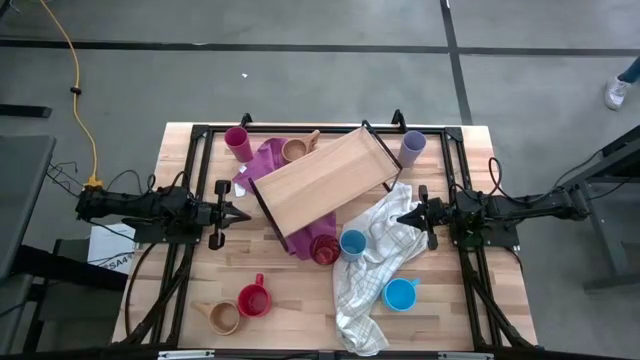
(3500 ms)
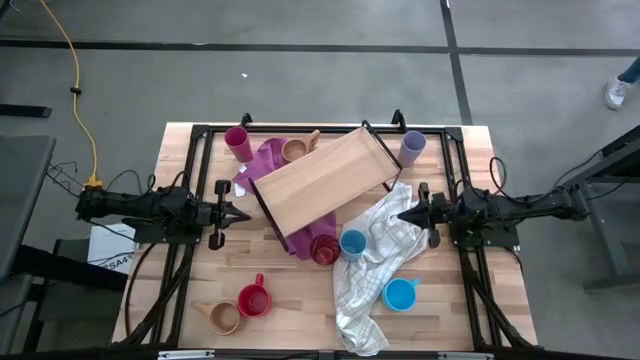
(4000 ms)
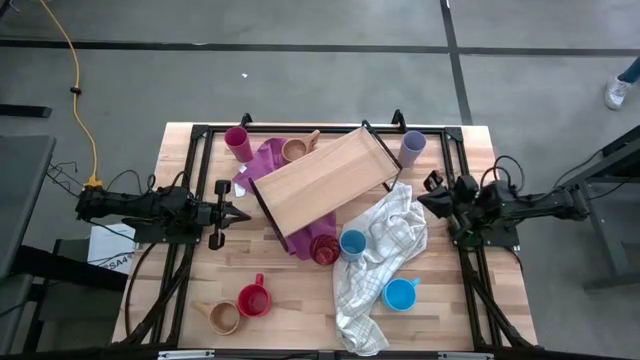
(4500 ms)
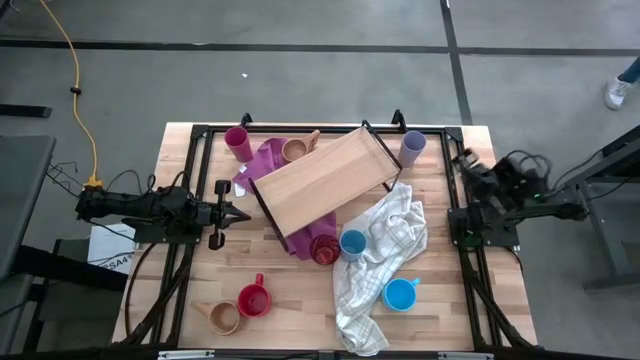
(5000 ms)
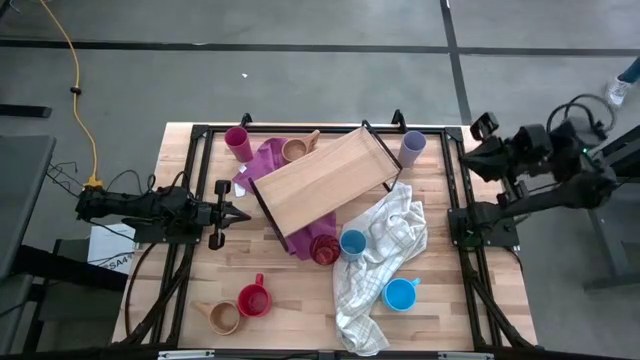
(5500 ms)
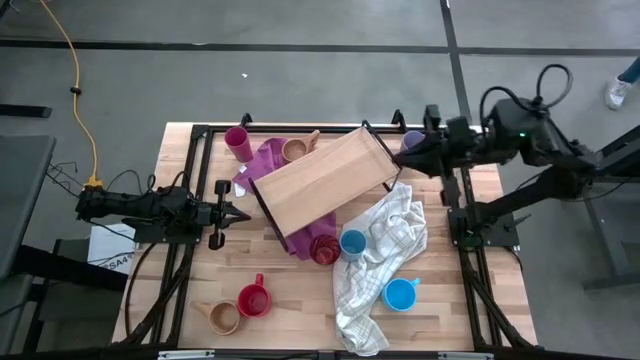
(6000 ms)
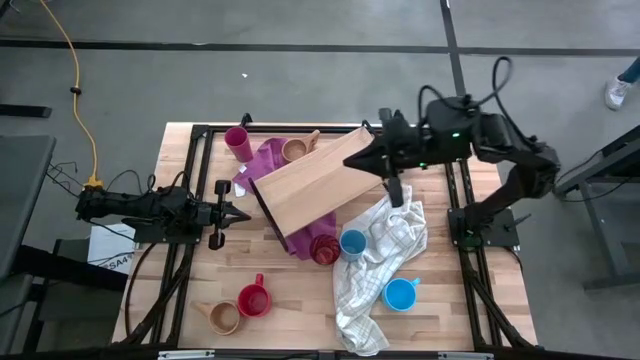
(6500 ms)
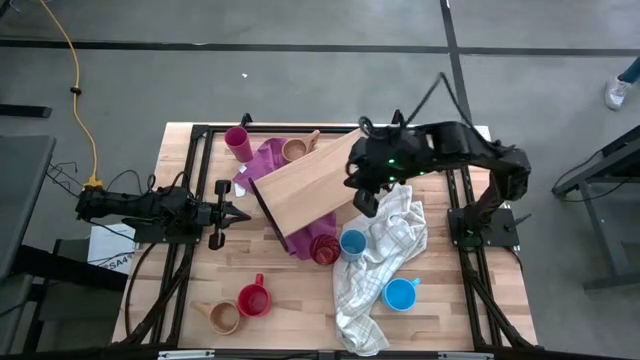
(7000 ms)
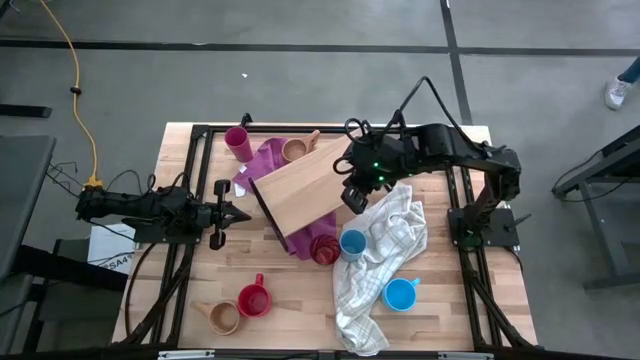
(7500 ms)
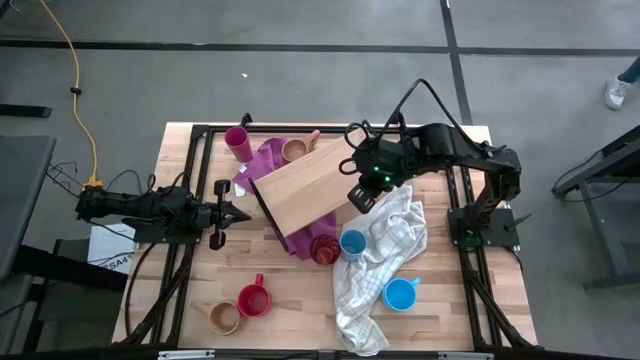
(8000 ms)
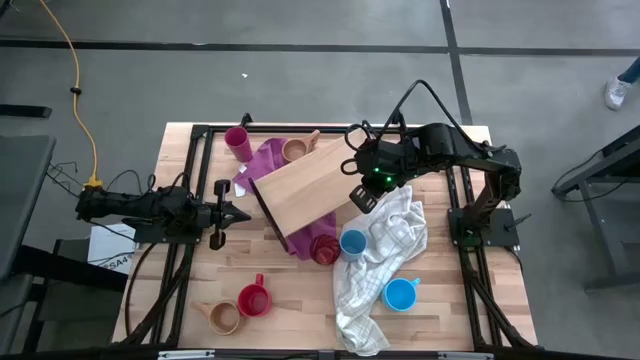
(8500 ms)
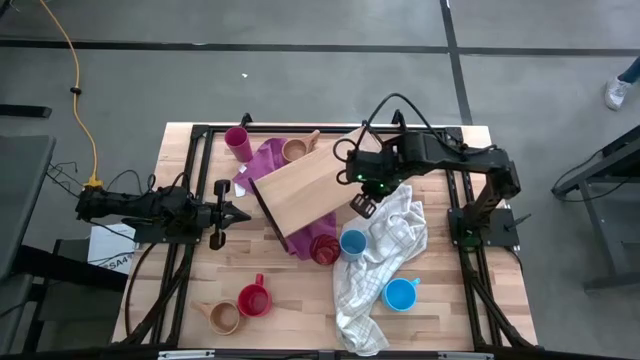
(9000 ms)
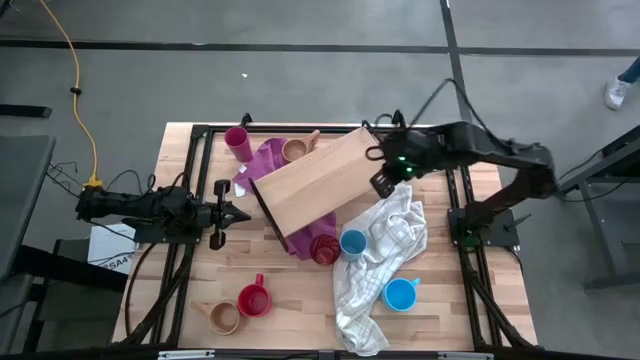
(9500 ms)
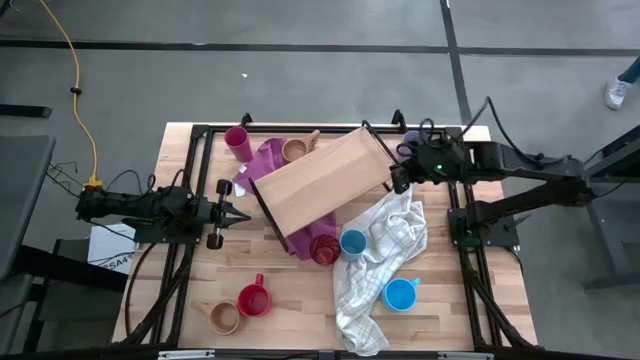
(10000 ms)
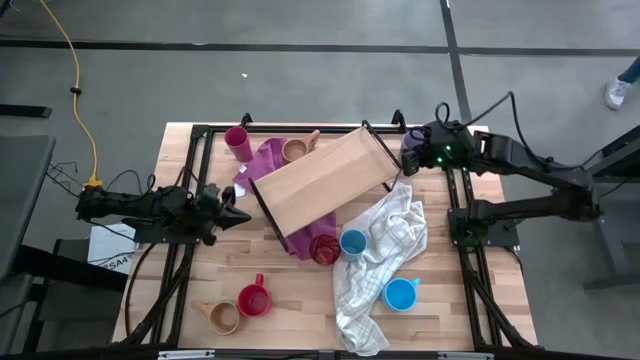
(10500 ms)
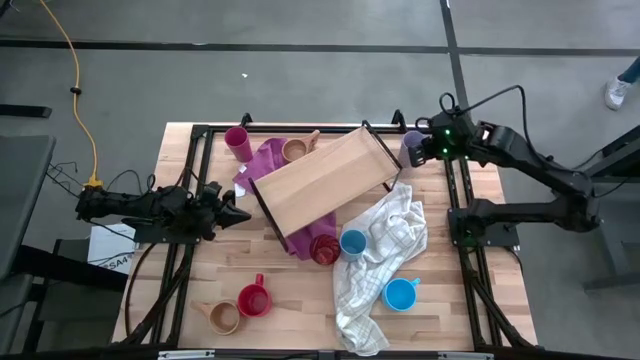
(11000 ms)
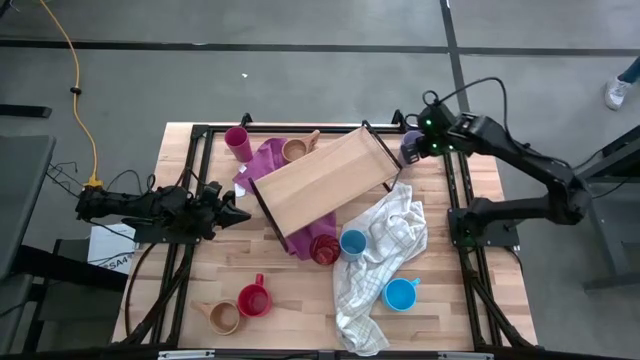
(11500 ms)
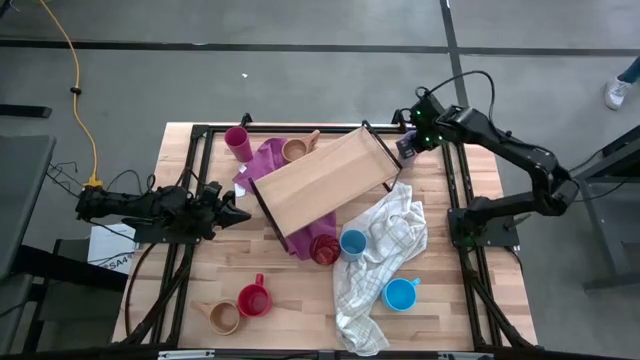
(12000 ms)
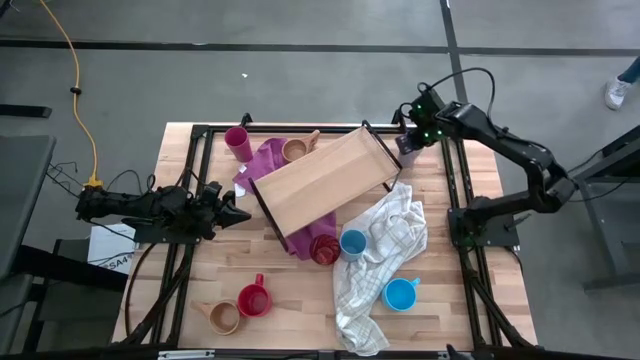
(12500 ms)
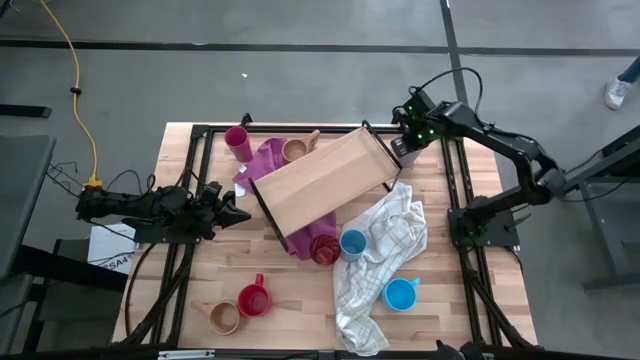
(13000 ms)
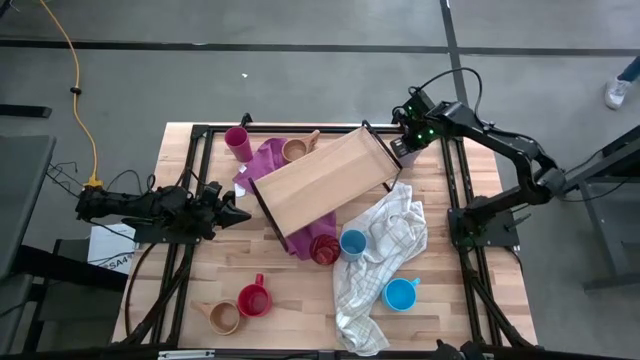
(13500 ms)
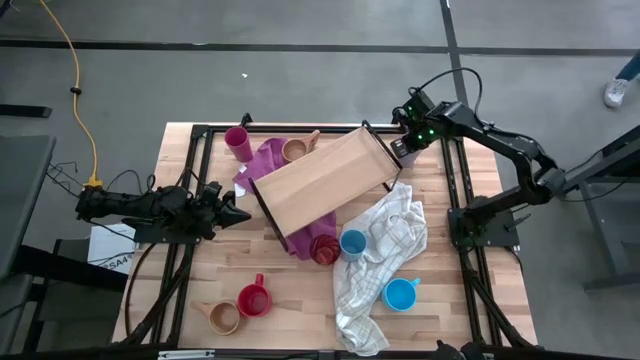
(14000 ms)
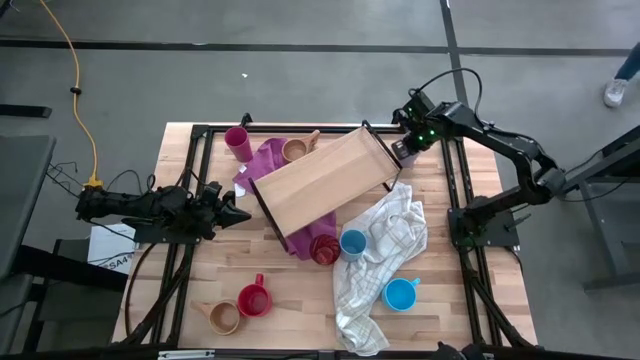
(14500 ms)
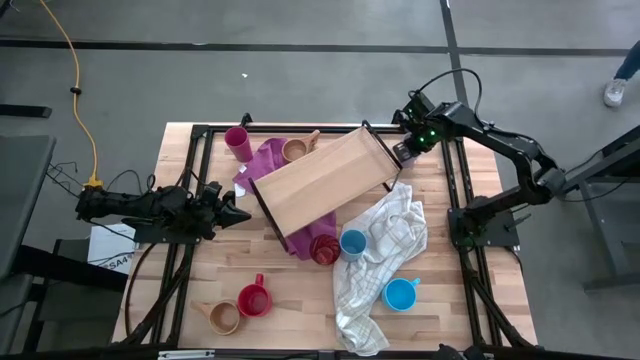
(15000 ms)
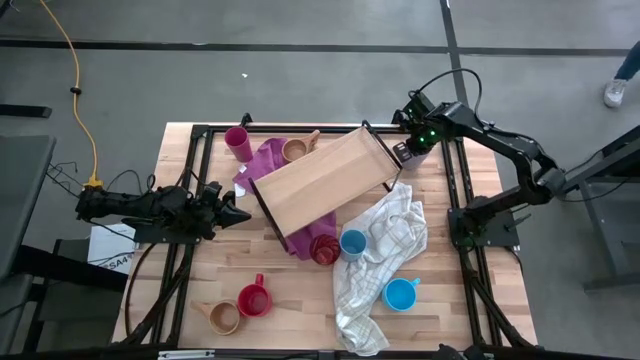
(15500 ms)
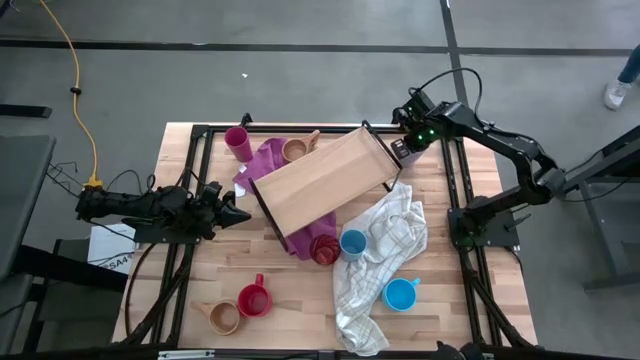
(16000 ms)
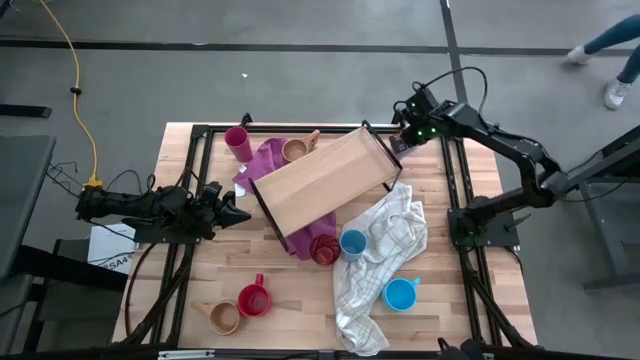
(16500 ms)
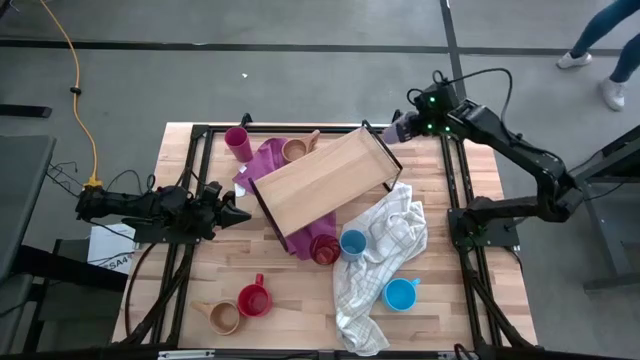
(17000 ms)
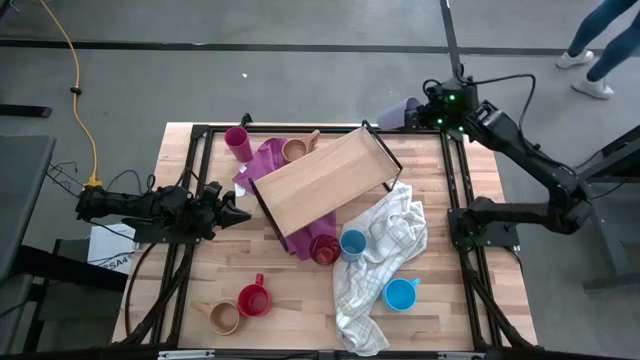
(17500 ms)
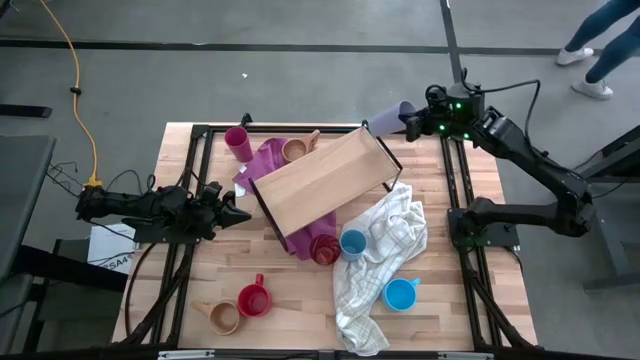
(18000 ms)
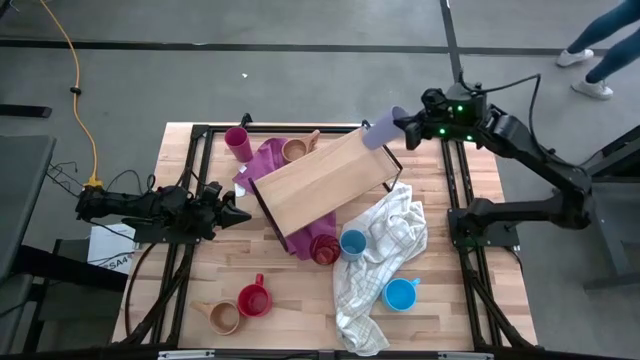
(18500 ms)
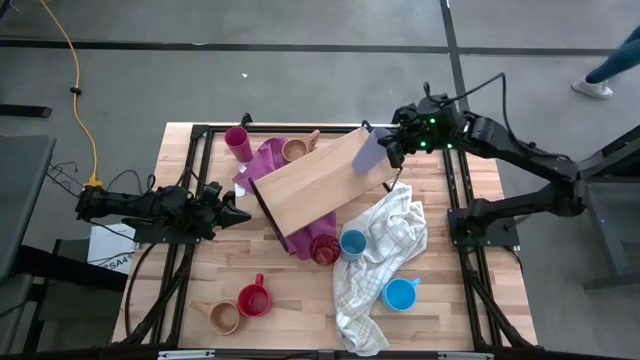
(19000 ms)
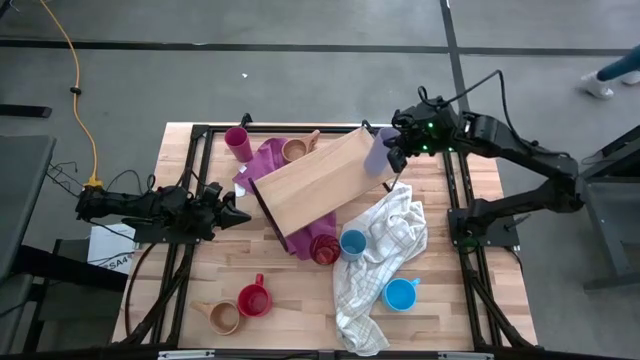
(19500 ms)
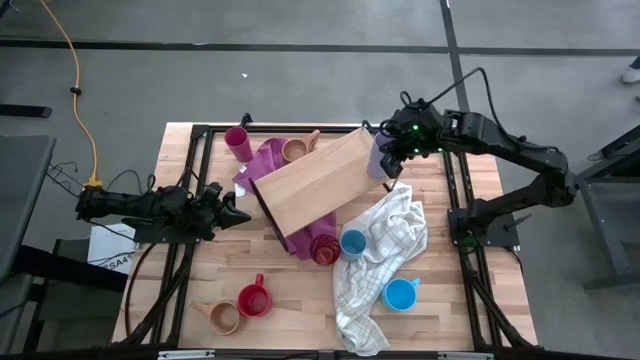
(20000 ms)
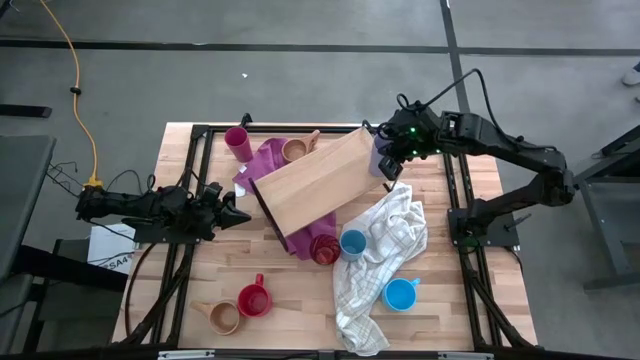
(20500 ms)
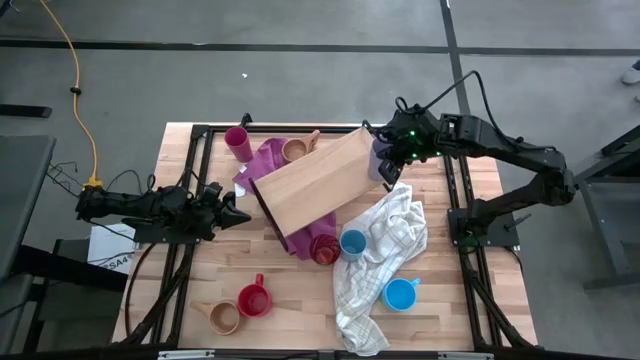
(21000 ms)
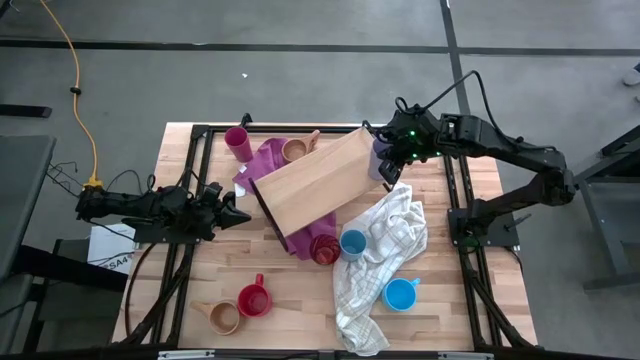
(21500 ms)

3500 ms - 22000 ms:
Task: Stack small to large cups/mugs on shelf
Put the purple cup on the shelf
